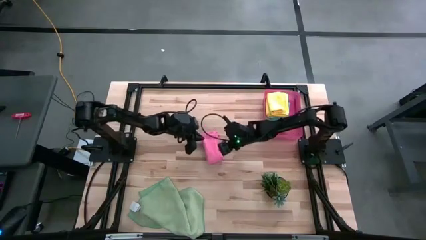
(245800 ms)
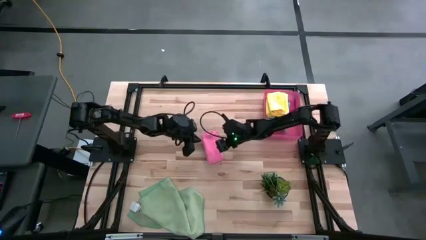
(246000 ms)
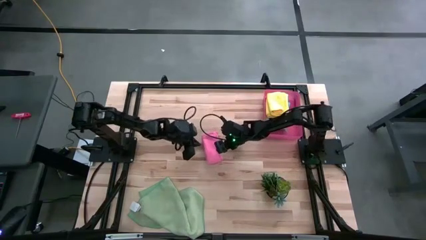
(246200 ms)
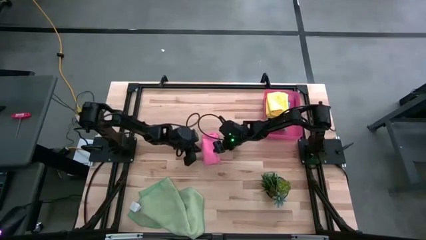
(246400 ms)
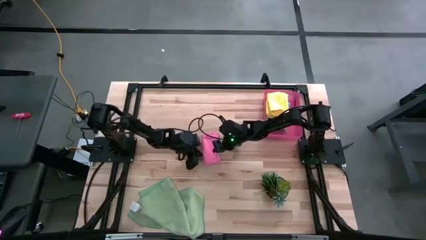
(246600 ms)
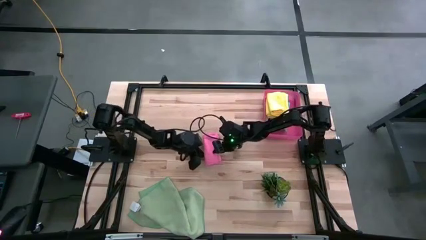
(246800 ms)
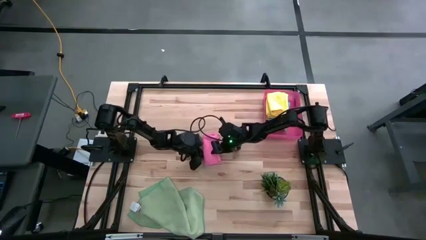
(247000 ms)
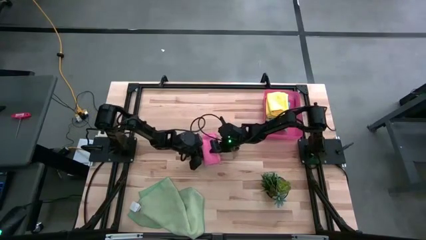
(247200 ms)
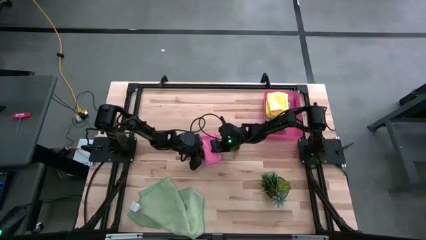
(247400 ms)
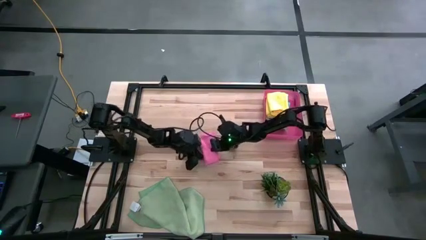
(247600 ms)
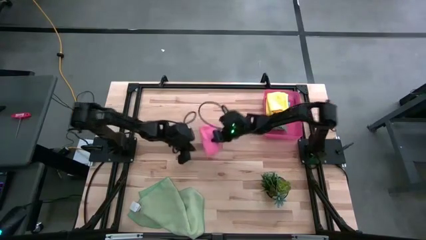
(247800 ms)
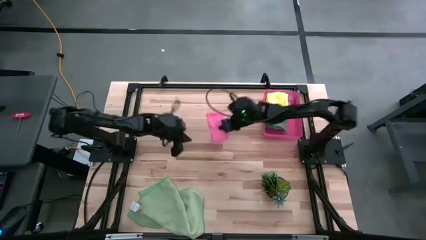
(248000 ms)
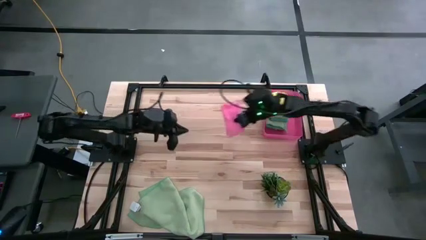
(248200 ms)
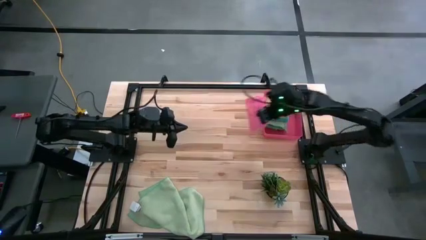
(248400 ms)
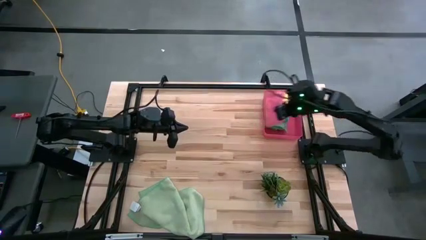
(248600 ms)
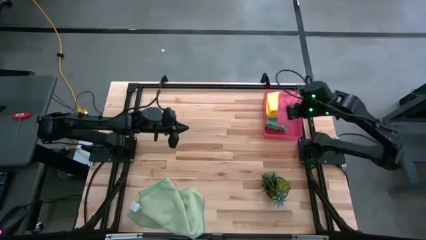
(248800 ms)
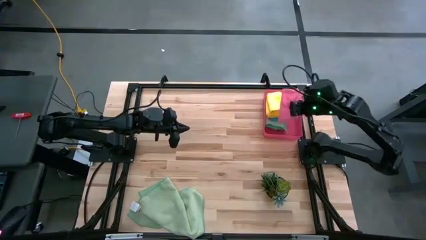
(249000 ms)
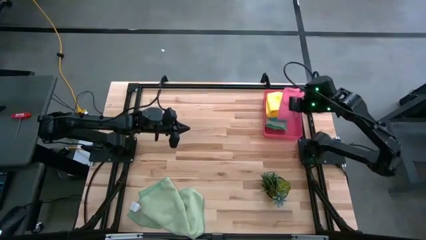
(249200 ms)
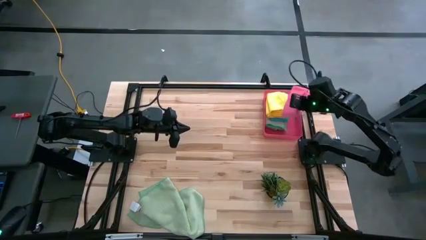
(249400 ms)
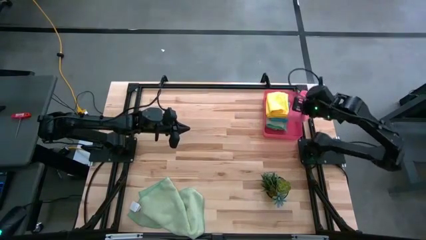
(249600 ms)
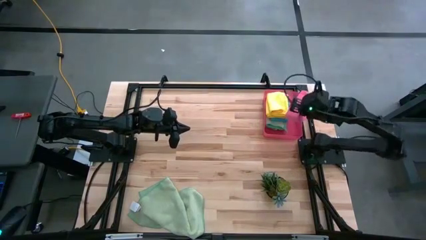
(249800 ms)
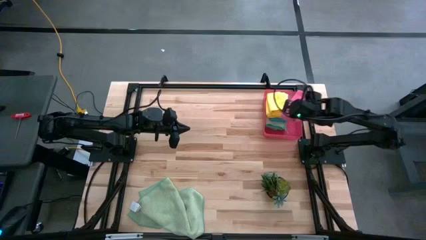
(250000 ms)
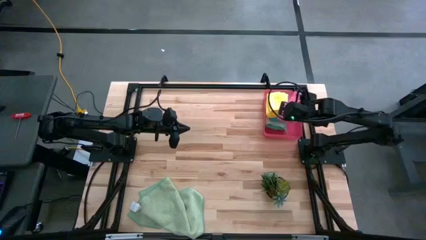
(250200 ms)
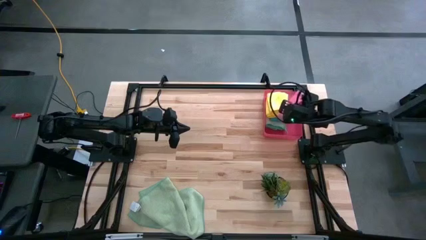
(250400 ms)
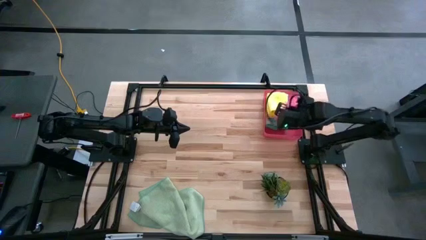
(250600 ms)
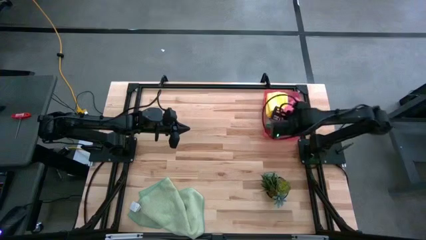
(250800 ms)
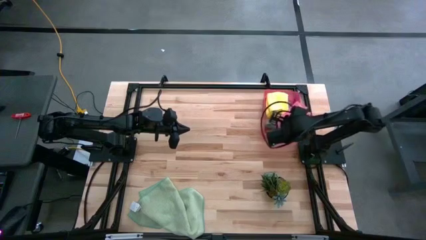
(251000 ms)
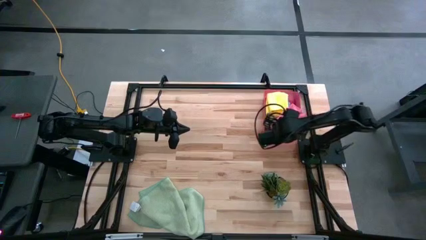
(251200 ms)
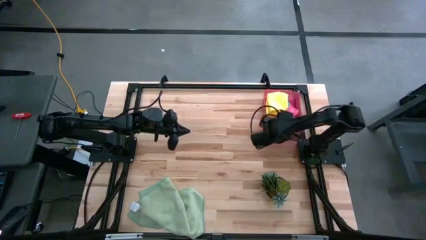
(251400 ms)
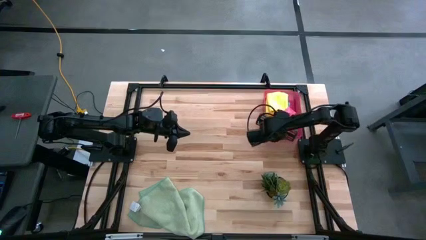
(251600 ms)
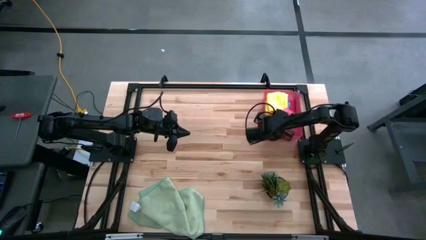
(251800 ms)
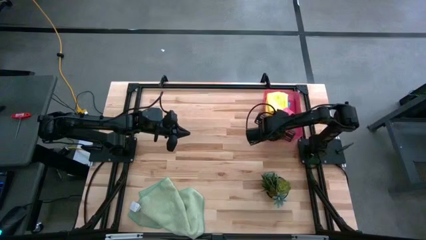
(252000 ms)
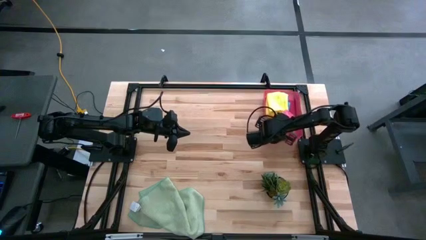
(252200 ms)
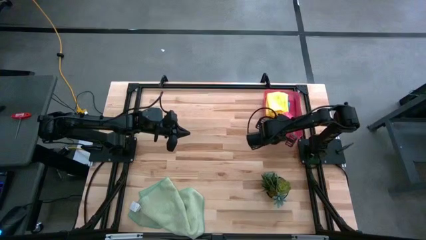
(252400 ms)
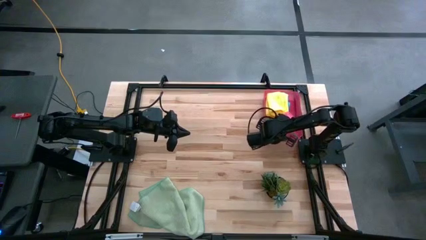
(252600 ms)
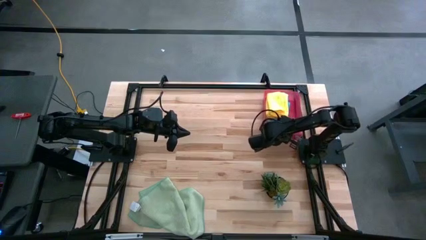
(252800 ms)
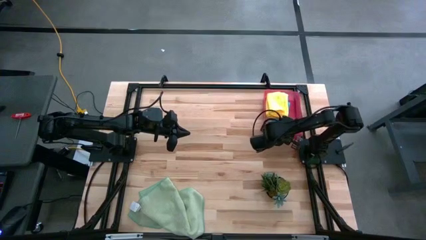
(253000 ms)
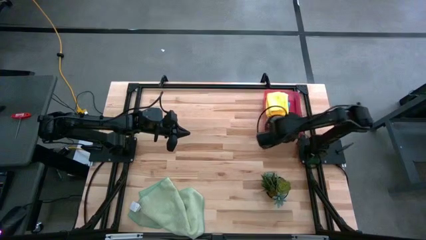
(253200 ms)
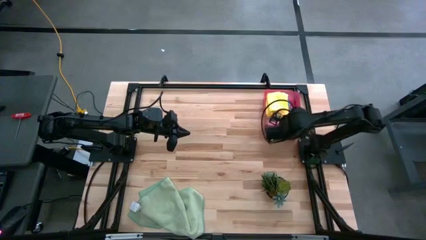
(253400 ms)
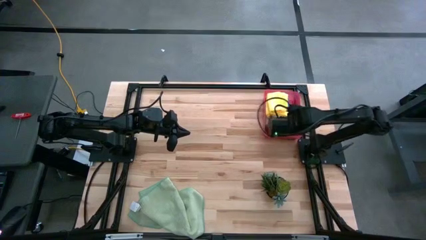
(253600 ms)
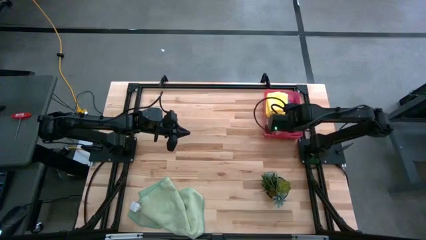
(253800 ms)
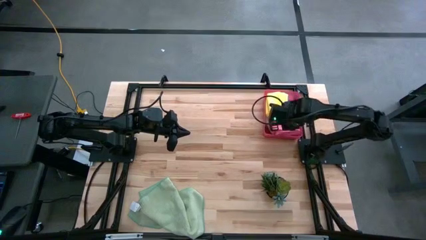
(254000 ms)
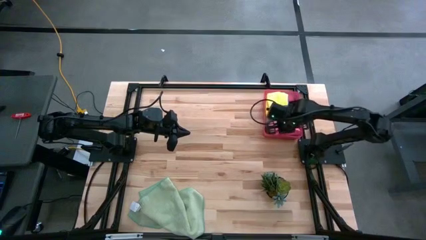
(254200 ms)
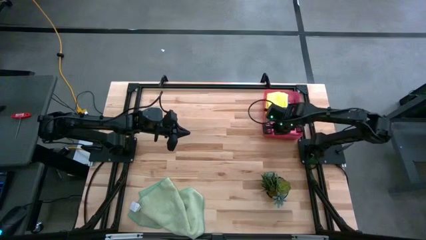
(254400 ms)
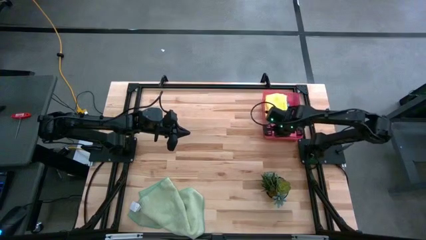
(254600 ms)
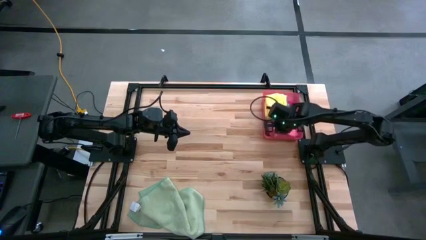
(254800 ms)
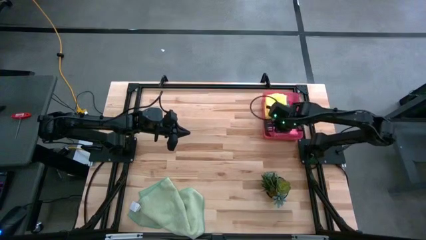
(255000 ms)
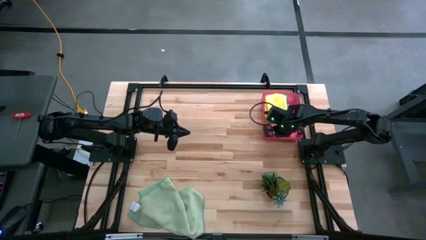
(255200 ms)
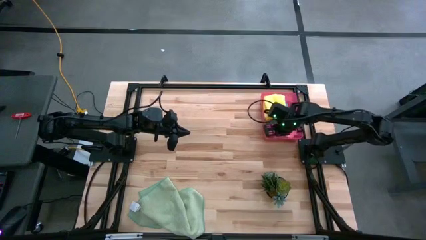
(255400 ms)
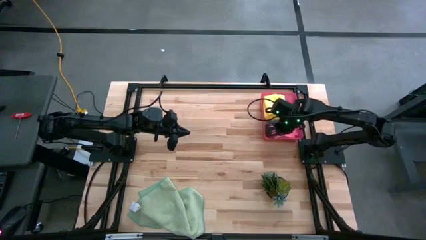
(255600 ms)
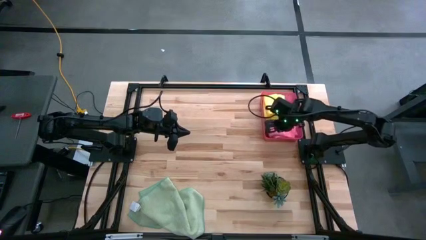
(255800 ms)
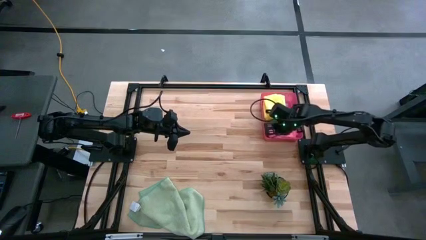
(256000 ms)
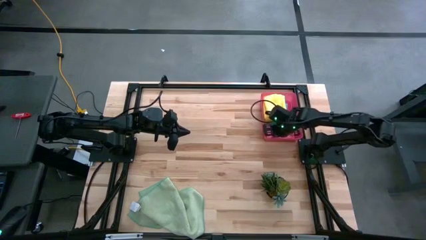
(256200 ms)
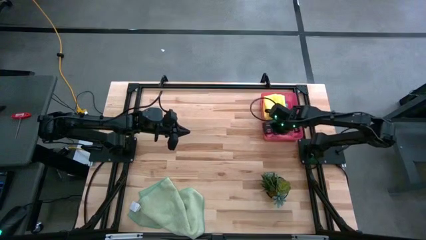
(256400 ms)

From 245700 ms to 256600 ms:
Task: Fold microfiber towels
Put the folded pink microfiber cloth into the red bin

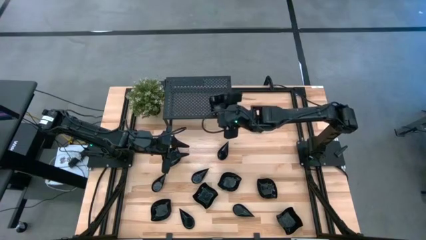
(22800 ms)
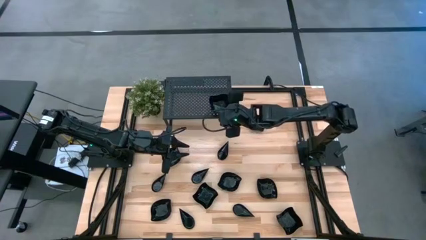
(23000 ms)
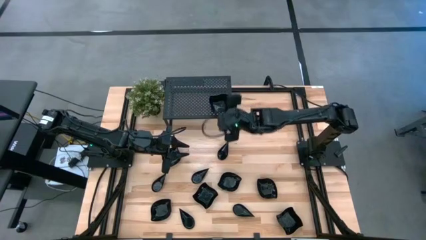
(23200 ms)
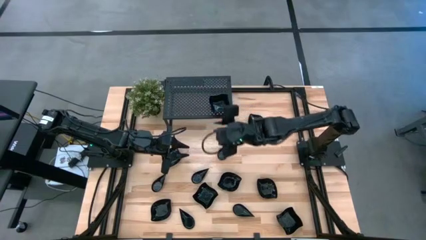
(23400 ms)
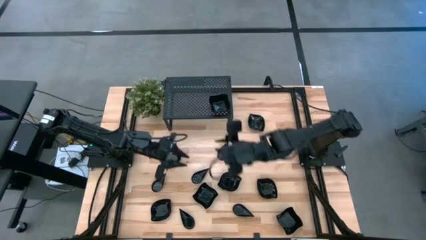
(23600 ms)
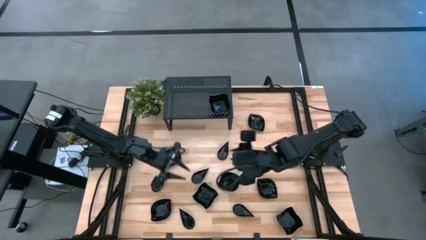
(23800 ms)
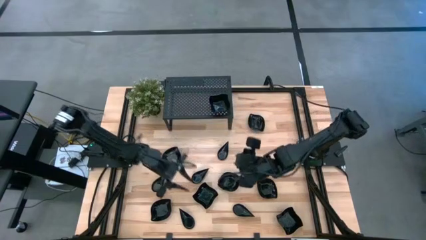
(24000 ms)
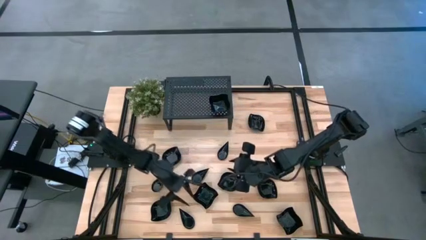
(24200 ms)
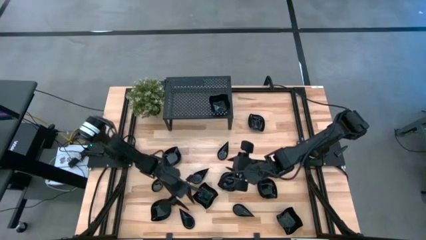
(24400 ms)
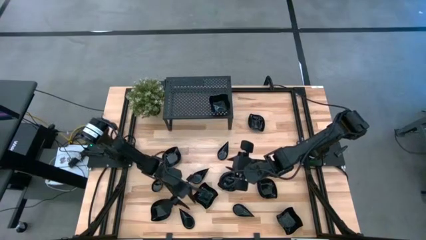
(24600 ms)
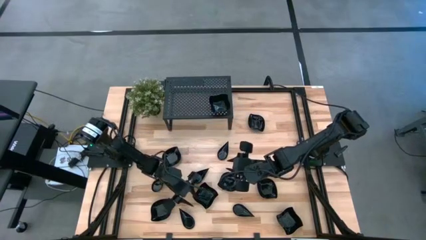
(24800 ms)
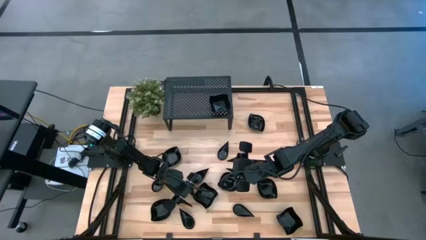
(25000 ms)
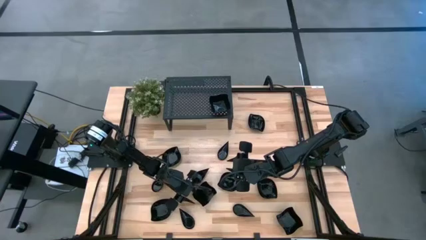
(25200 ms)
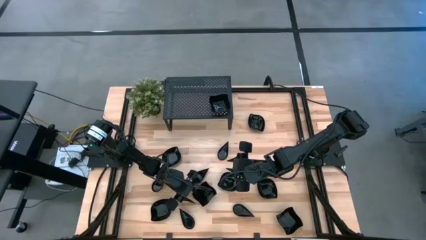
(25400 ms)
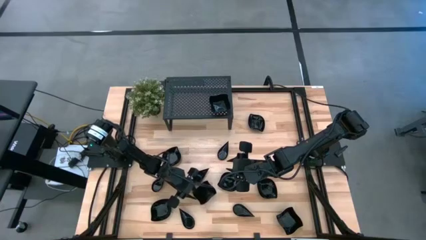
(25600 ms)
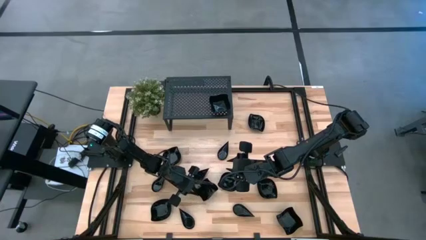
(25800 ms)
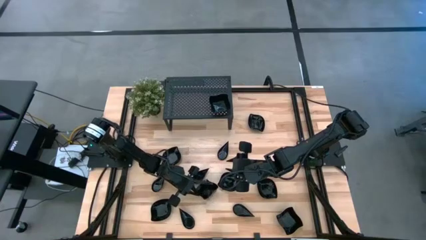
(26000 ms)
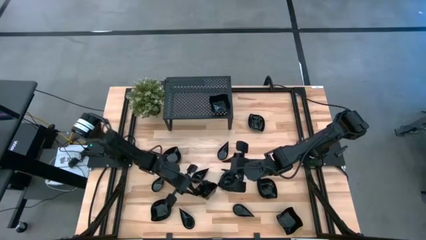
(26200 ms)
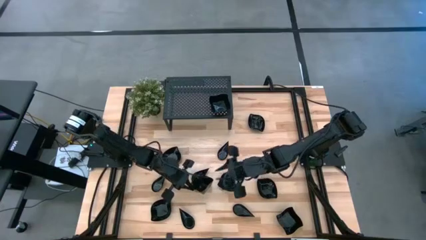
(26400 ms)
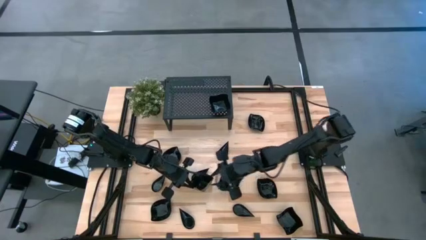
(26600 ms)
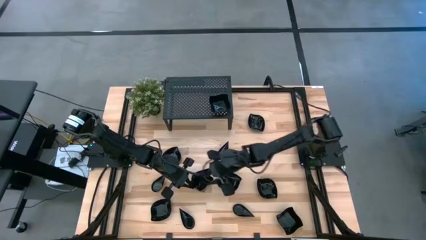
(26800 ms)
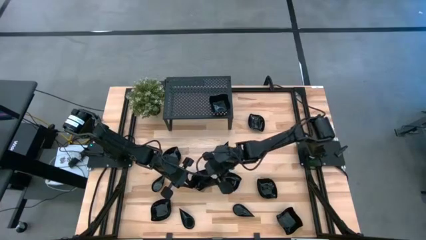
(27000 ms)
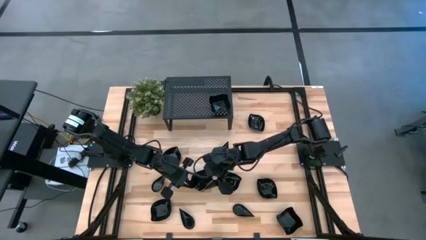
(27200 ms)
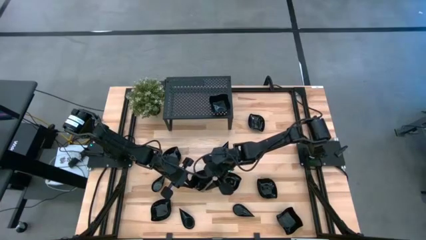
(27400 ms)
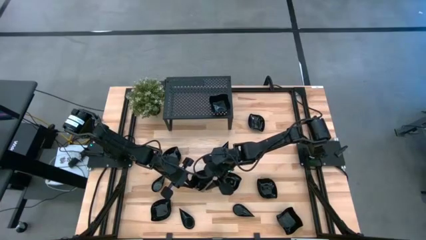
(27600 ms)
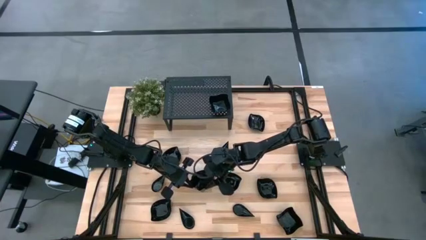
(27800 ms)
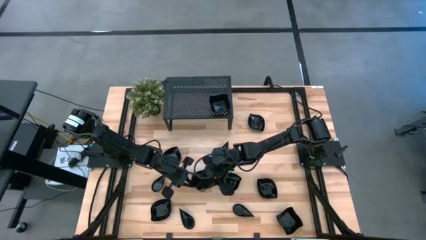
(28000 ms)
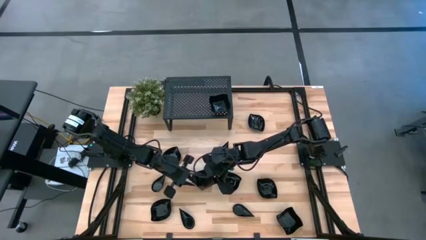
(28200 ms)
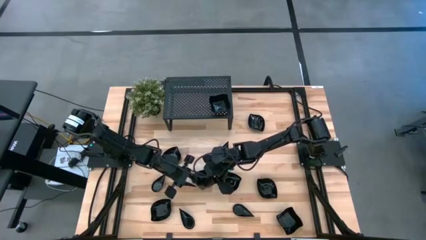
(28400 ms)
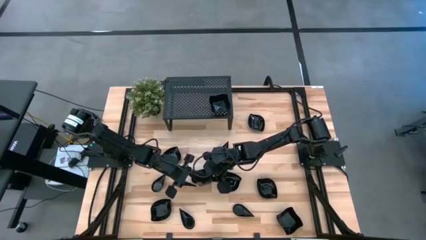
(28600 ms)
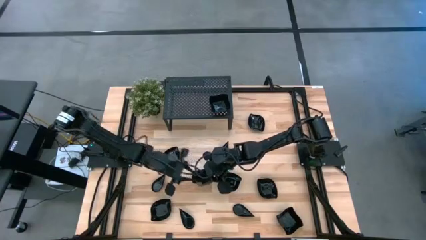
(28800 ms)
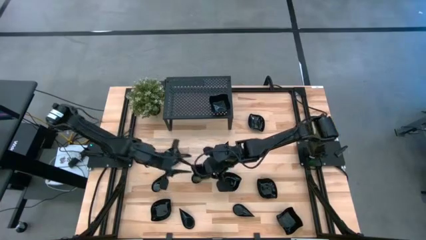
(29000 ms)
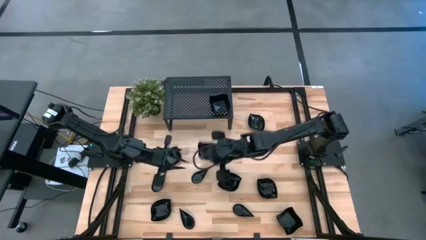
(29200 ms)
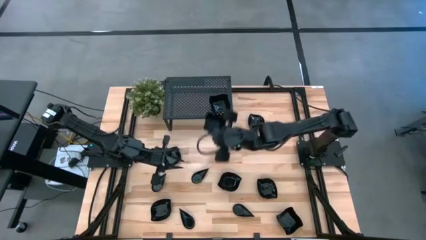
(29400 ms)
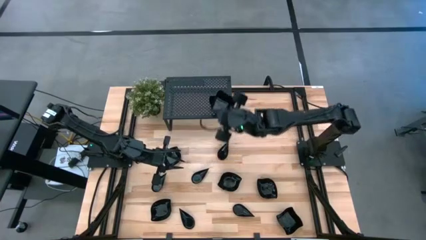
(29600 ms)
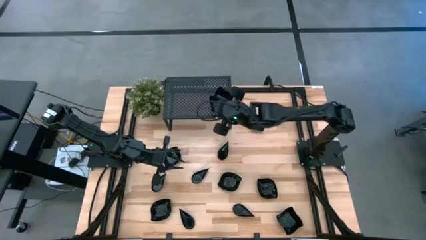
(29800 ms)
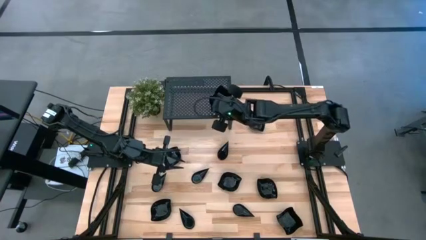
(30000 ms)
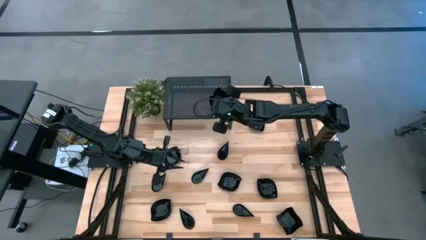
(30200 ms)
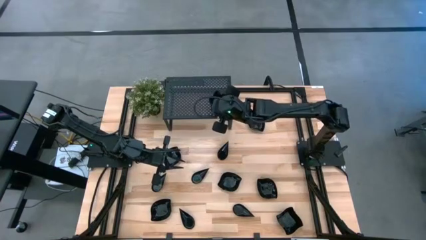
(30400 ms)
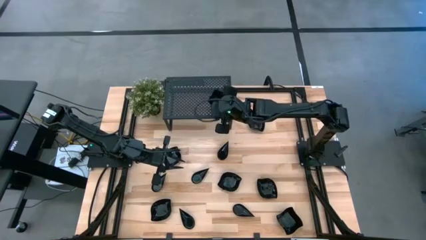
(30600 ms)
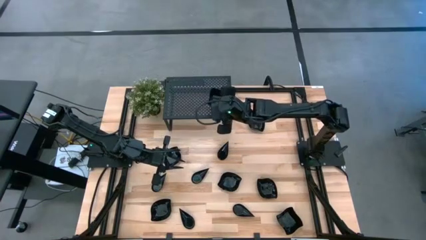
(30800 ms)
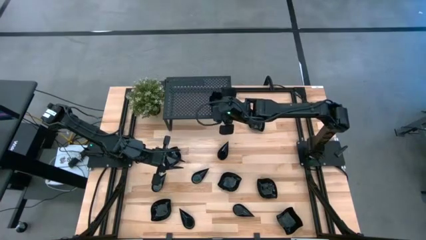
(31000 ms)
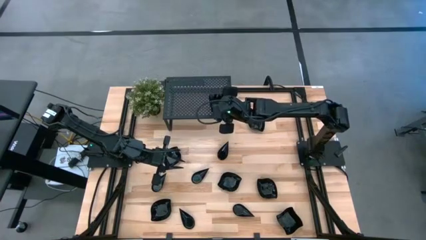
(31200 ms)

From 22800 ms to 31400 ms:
Task: Pick & Place Mini shaped plates
Stack the black distorted square plate on top of the black distorted square plate on the shelf
